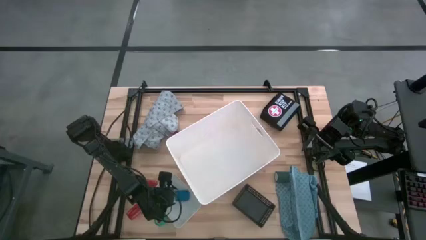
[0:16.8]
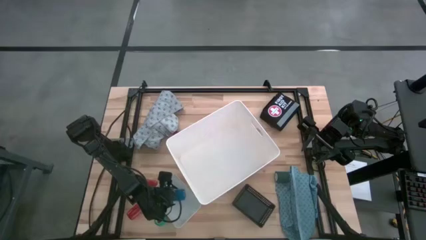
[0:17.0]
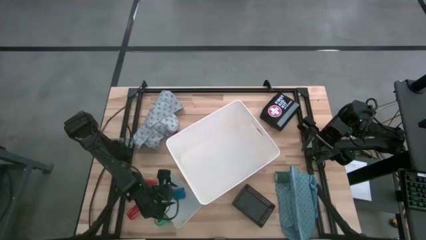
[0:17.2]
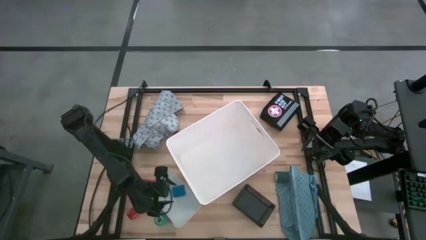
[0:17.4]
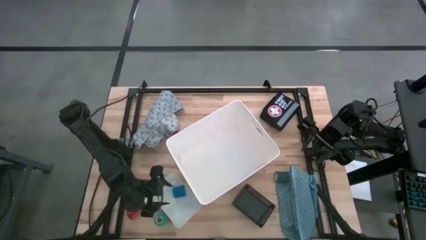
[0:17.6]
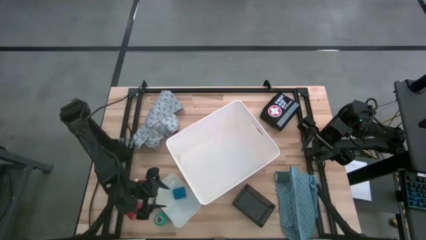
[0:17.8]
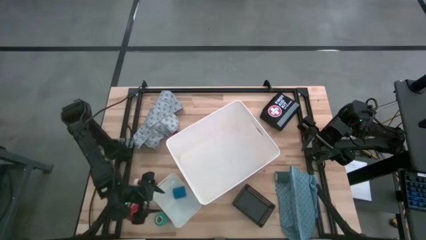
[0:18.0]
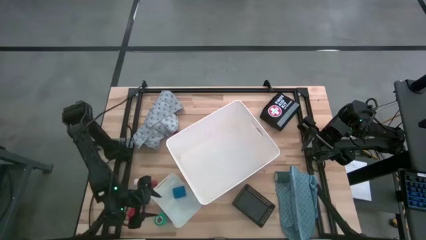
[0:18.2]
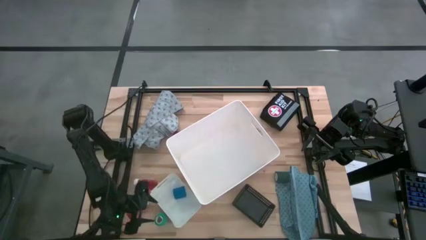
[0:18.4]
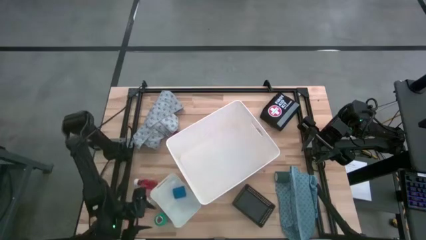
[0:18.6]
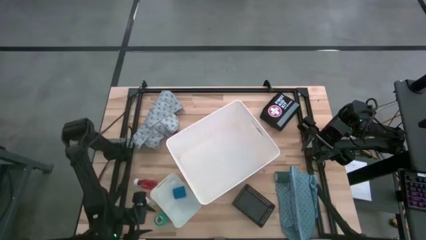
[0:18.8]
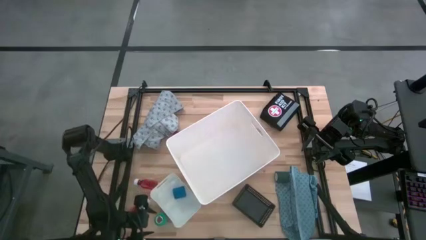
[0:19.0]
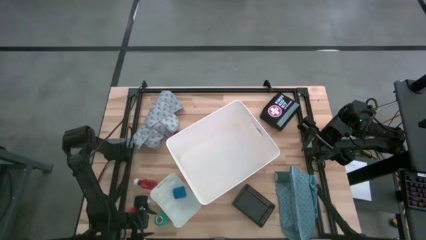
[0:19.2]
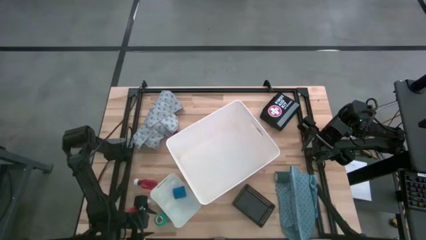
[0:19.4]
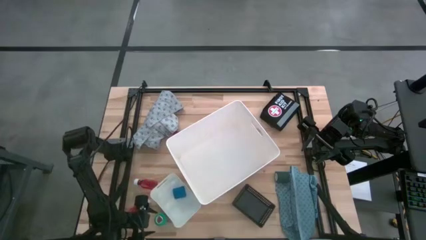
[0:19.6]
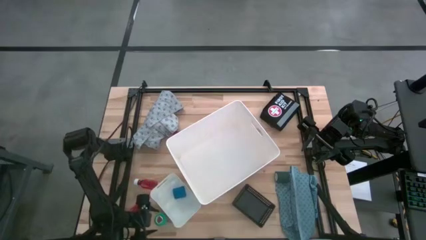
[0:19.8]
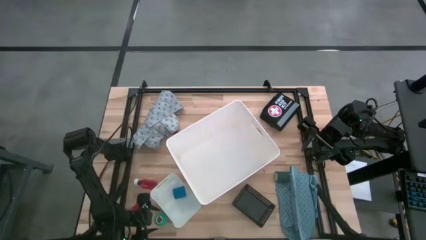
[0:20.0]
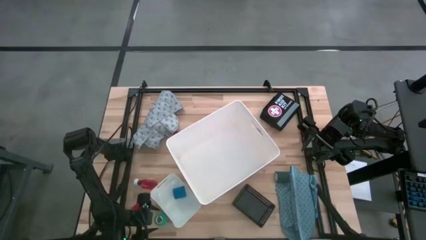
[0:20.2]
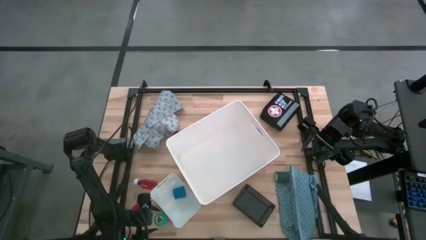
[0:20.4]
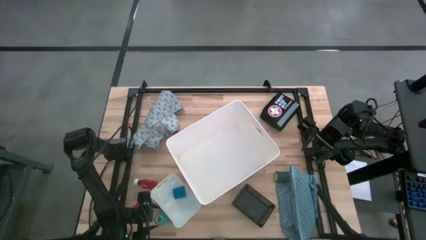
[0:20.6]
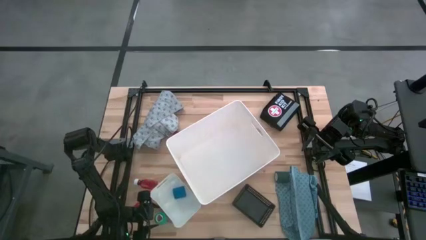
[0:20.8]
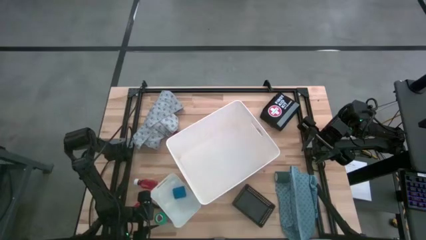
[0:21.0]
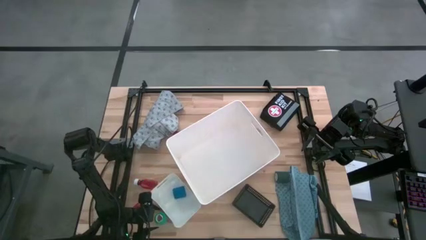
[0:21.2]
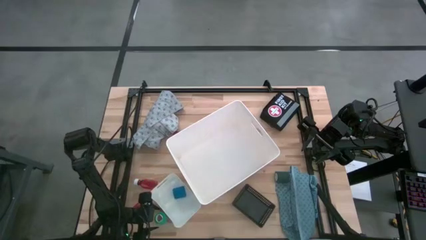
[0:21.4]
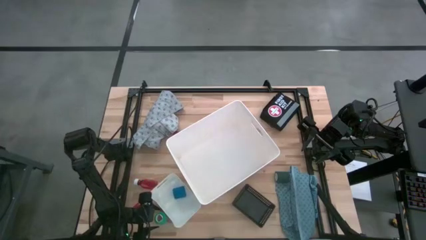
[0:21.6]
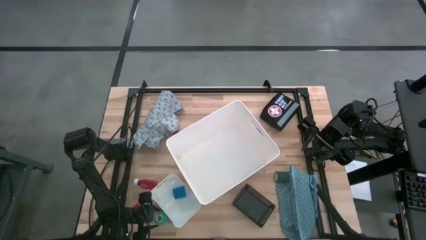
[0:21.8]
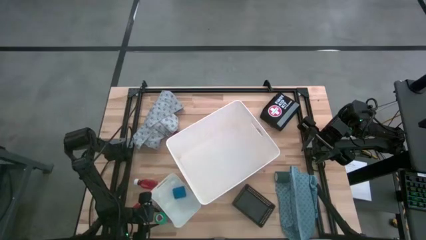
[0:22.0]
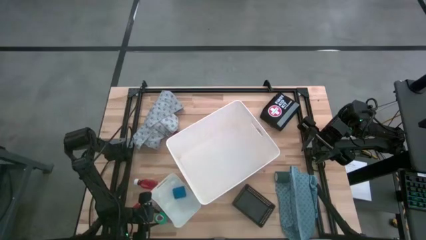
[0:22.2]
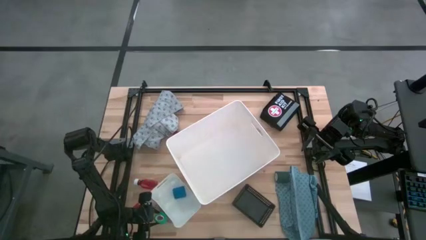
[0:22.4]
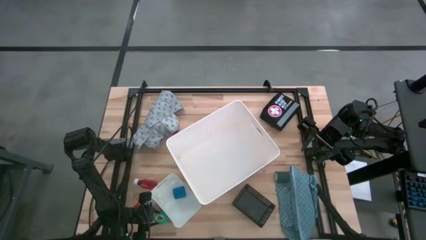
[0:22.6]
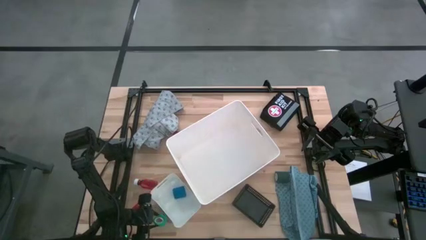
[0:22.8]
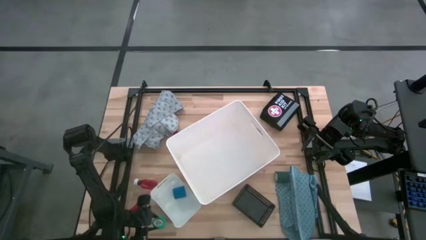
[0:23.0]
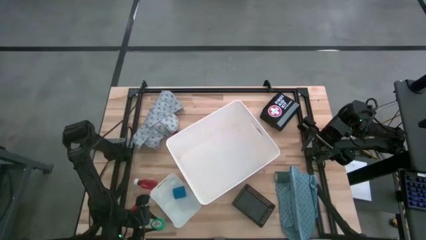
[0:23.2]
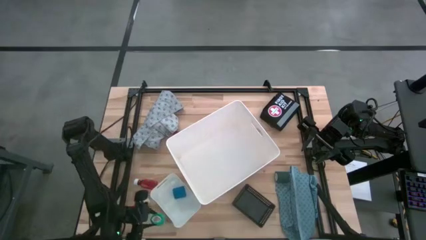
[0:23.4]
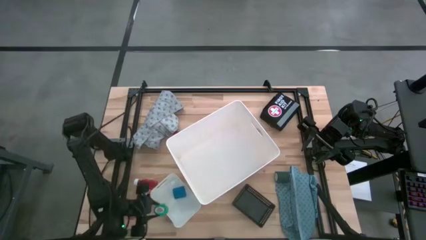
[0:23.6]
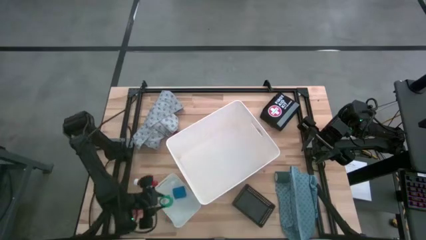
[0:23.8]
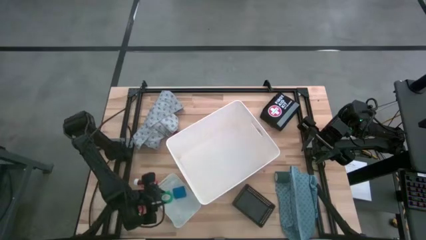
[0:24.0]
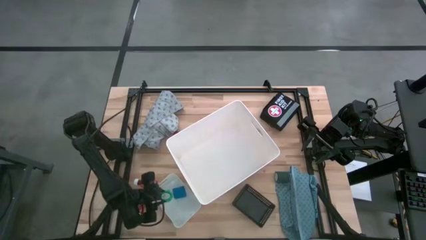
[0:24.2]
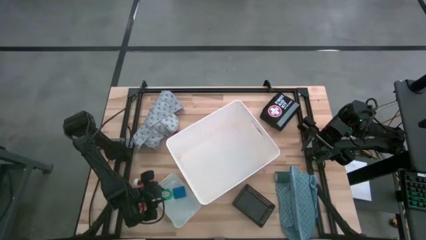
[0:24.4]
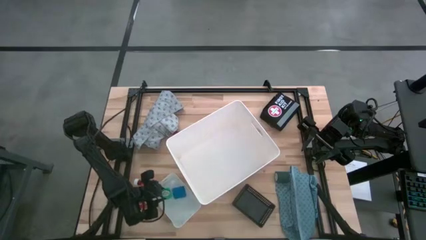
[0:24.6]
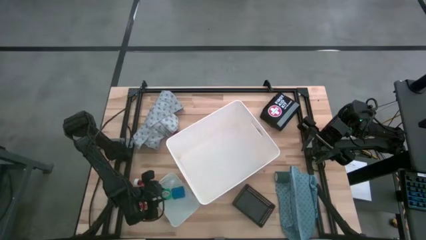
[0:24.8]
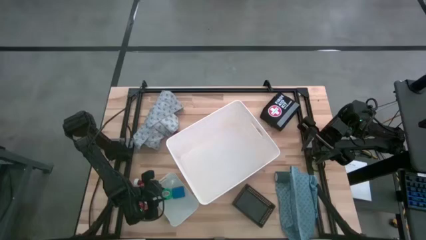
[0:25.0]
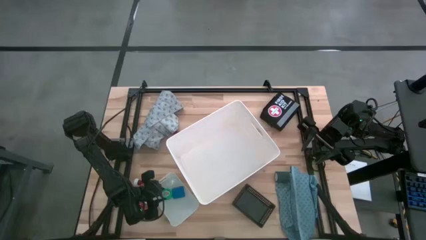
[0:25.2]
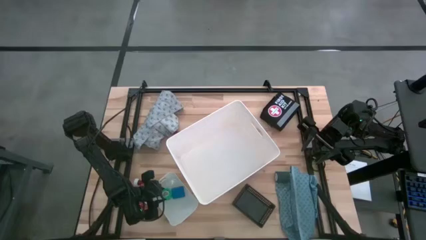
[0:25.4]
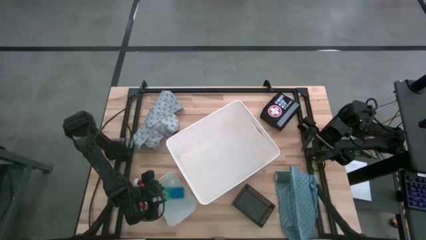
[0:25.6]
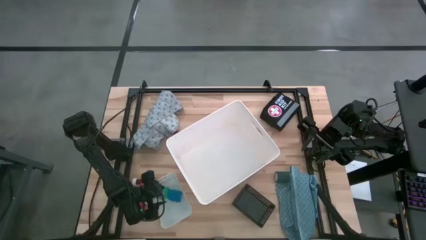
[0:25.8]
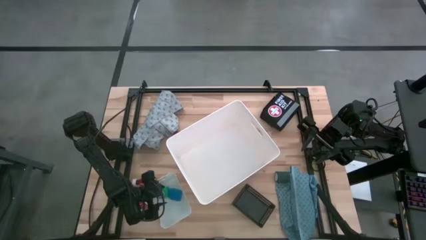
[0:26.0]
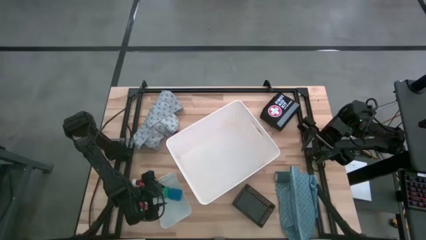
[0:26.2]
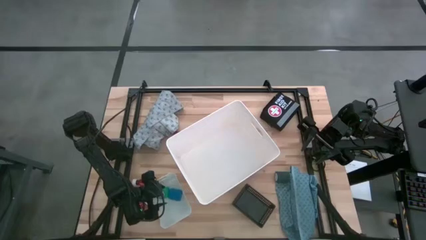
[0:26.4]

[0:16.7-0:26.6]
Task: Pick & place medical supplies in basket/bin
Put the green bandage into the white bin

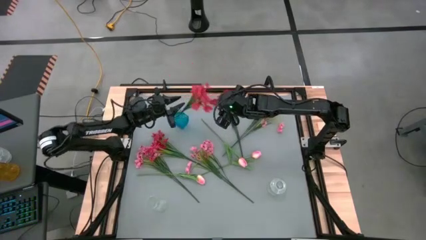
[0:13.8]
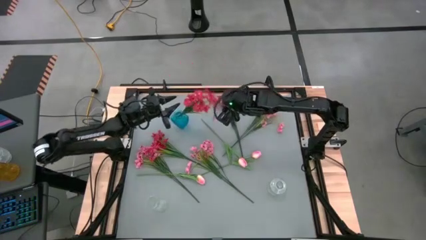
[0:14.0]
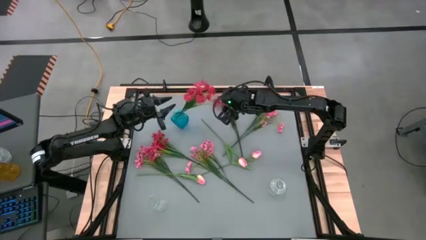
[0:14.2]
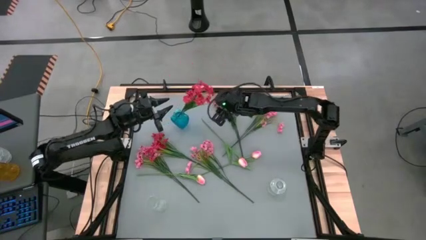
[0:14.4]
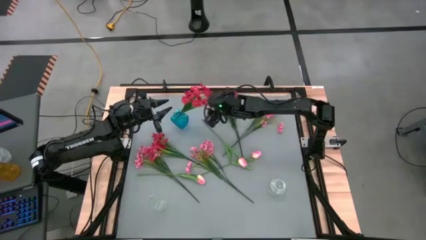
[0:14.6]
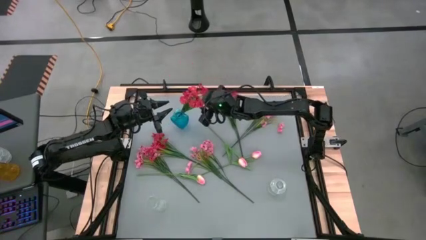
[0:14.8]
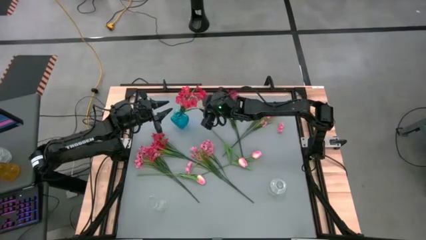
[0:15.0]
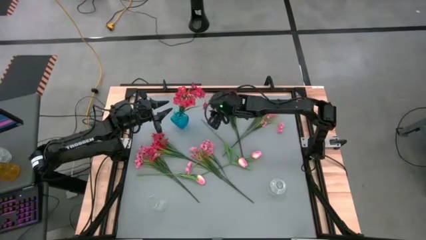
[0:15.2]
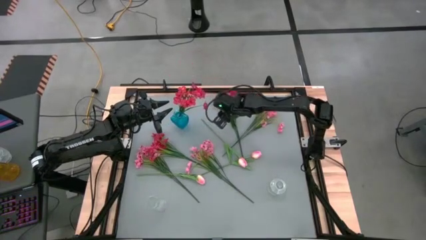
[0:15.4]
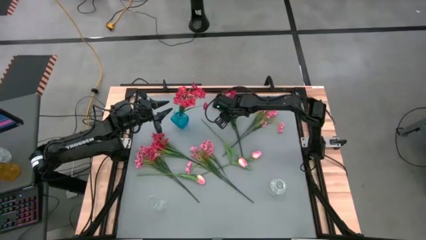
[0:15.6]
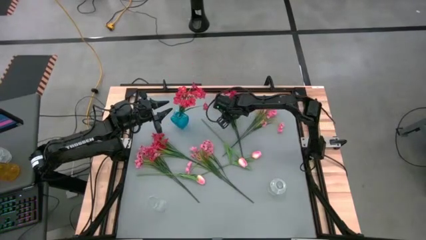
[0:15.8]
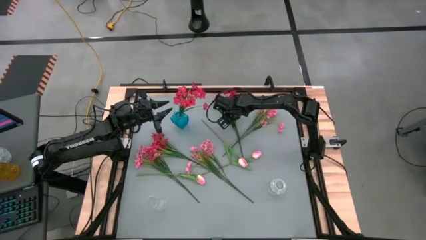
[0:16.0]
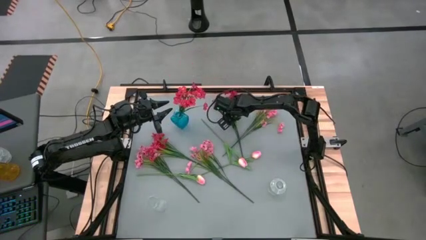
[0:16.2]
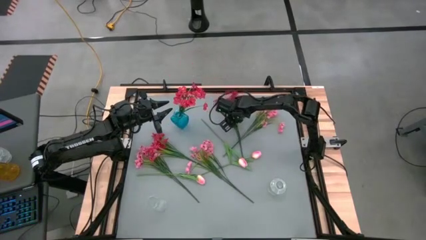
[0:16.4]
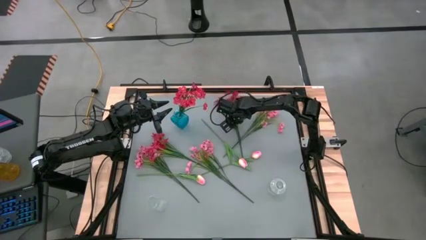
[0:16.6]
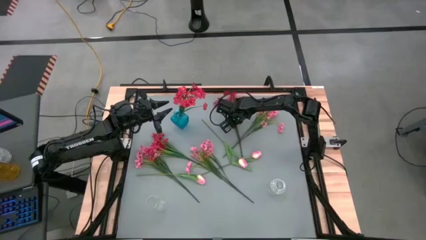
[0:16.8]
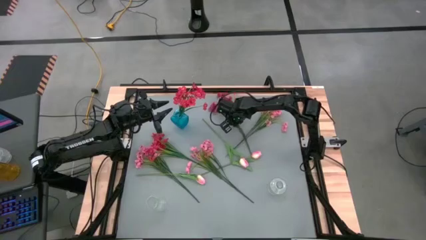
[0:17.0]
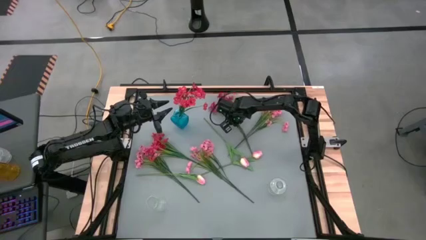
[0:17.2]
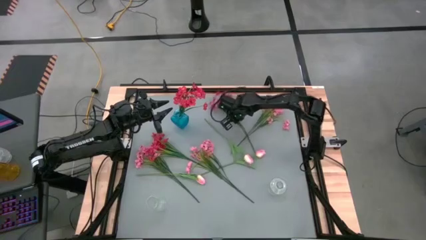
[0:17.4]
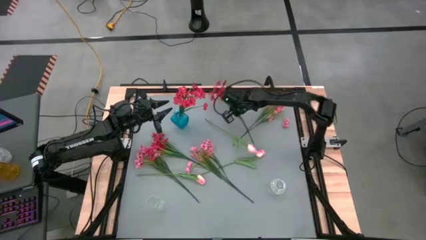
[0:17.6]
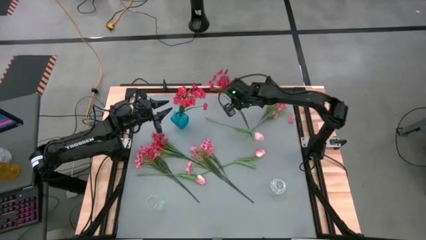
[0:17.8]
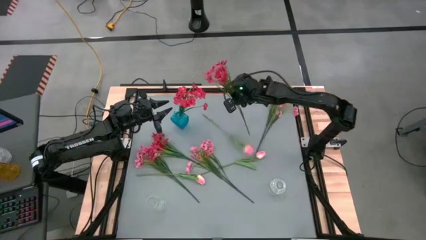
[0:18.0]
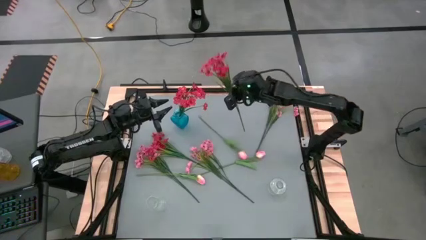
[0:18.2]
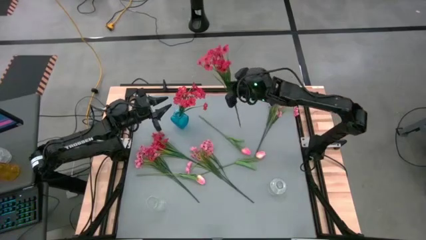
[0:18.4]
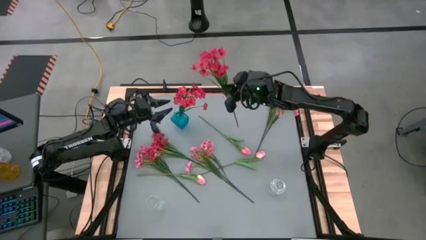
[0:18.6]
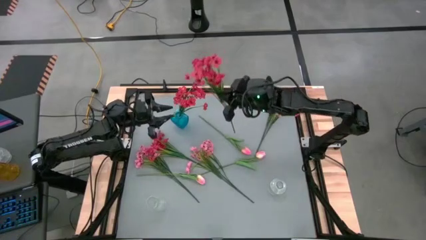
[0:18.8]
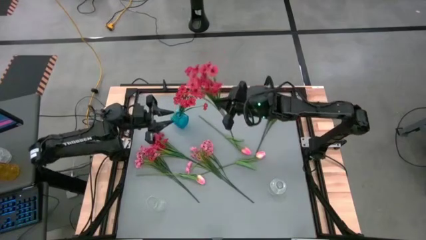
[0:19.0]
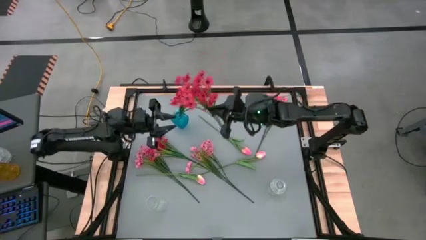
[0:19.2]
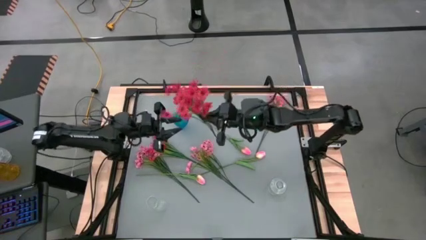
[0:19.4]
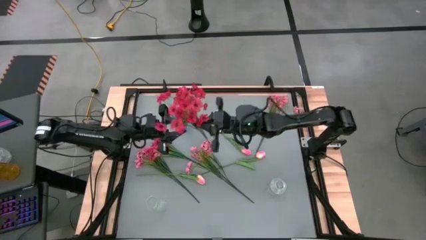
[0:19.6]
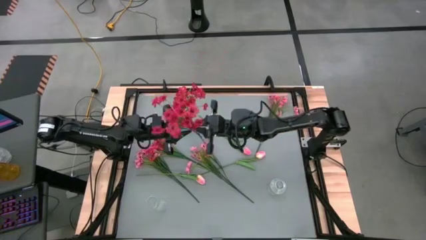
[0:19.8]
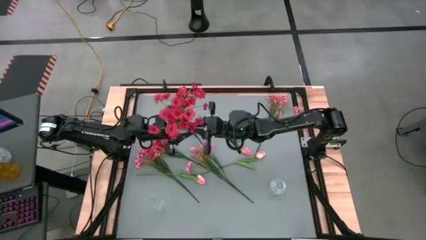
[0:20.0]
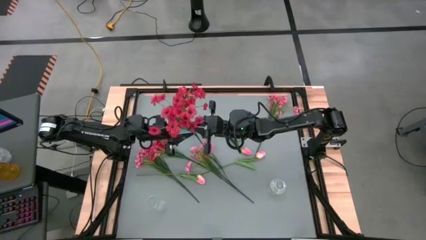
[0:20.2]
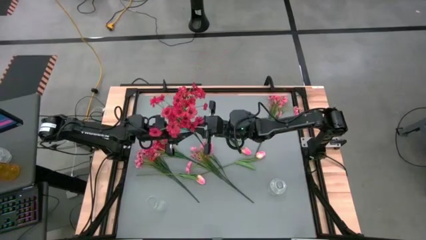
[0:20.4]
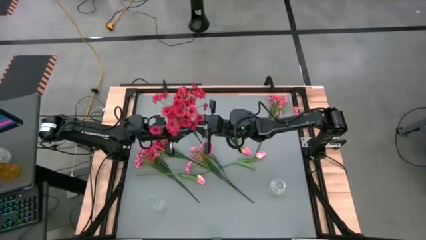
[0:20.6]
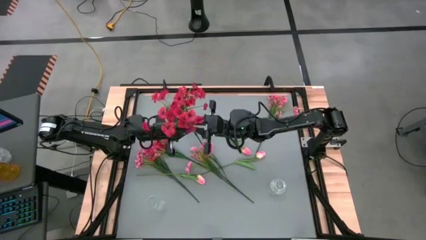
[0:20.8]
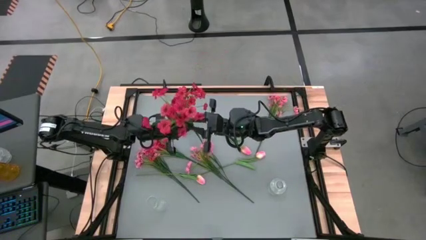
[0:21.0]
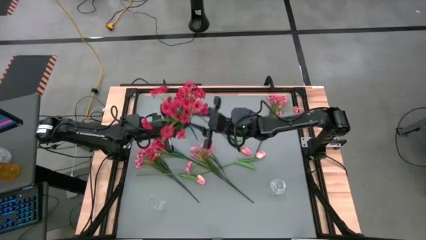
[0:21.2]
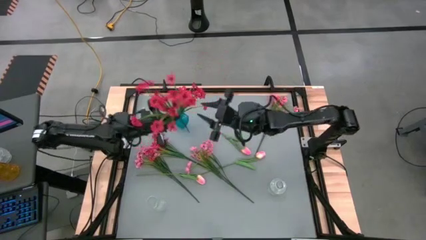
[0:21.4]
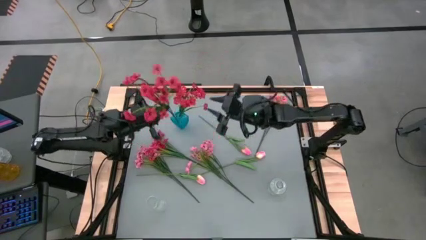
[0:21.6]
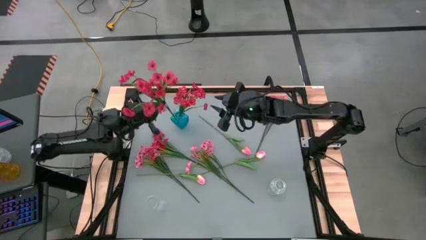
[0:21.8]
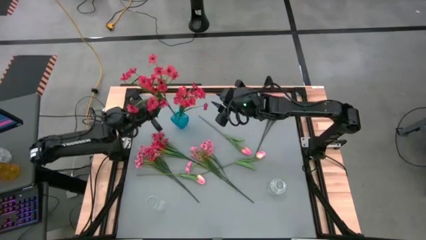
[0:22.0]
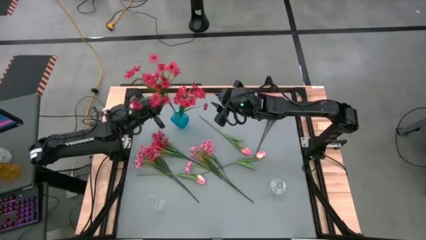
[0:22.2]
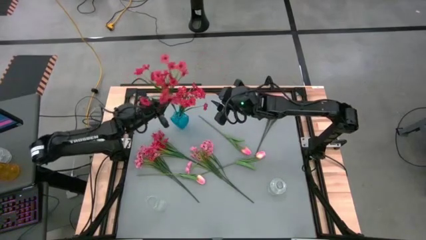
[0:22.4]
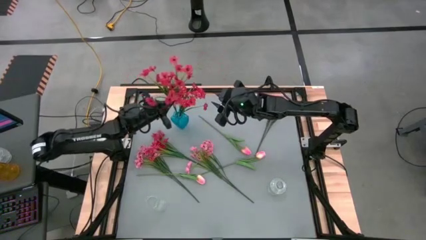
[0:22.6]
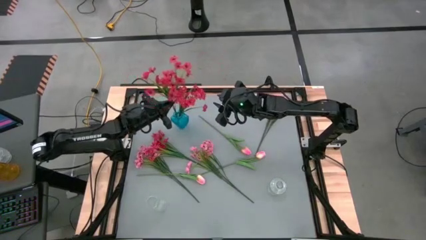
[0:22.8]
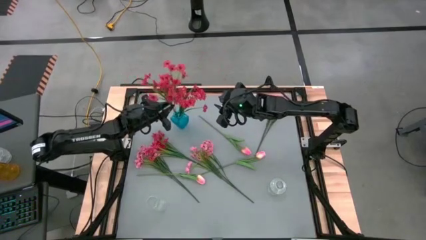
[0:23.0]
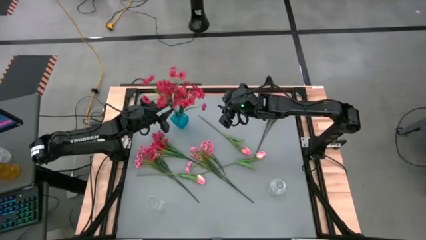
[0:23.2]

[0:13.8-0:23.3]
Task: Sort flowers into vase by color
Put the top red flower into the blue vase
